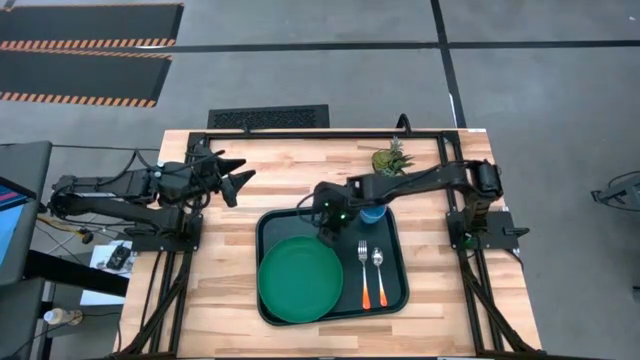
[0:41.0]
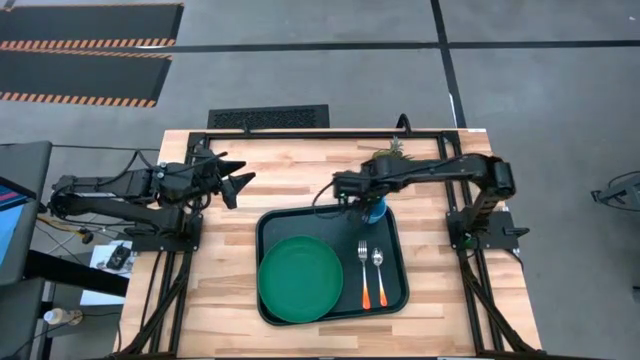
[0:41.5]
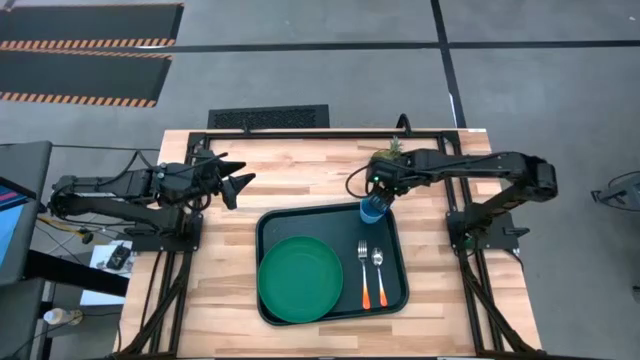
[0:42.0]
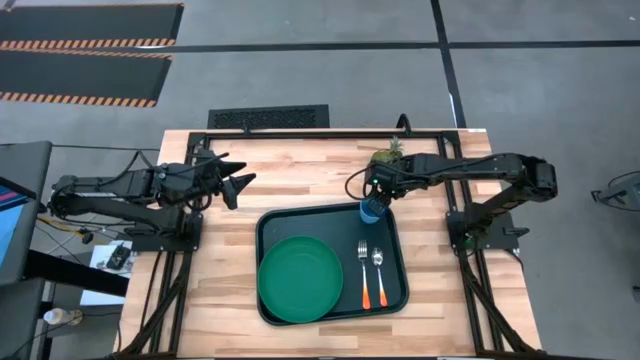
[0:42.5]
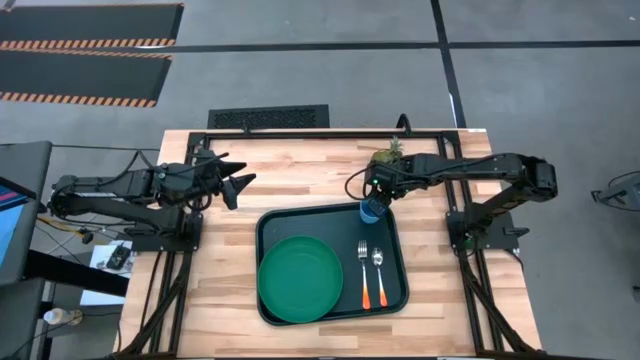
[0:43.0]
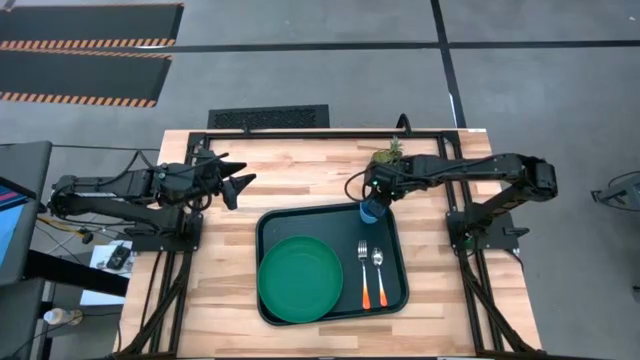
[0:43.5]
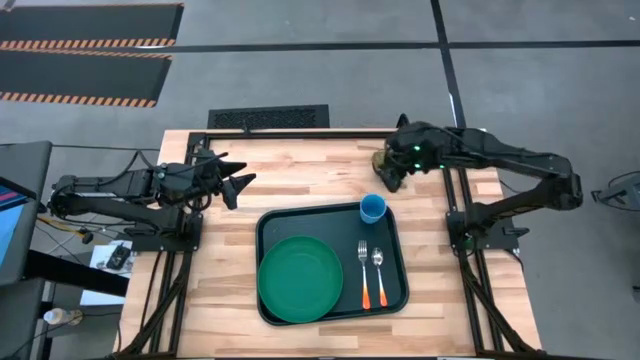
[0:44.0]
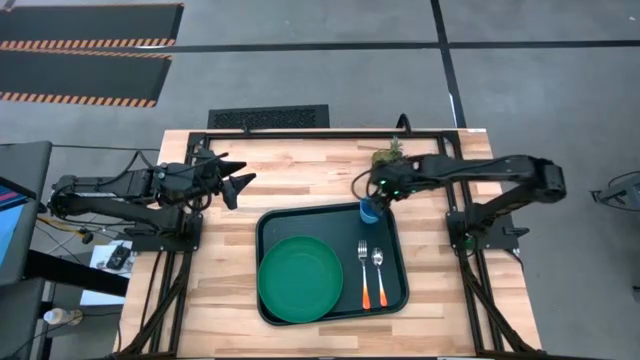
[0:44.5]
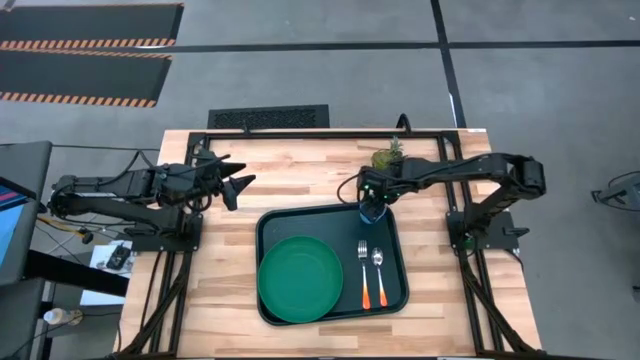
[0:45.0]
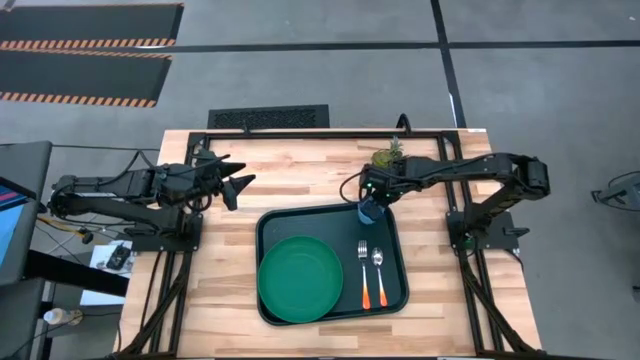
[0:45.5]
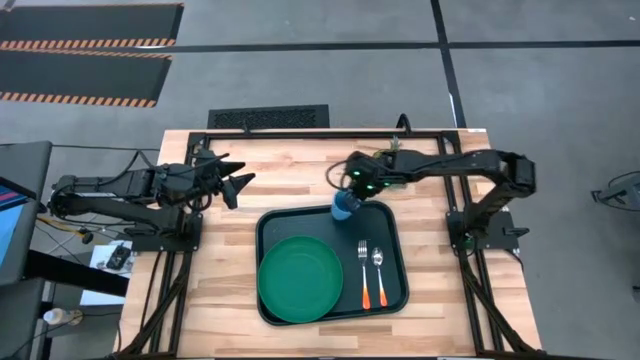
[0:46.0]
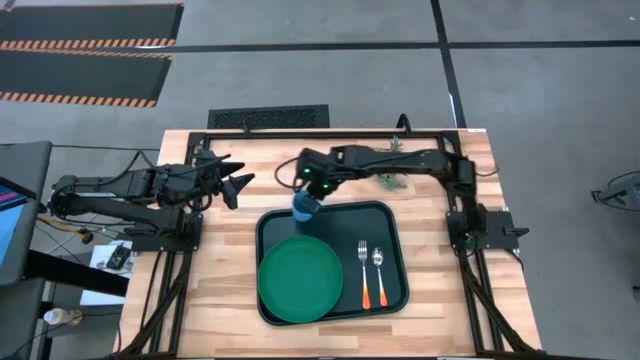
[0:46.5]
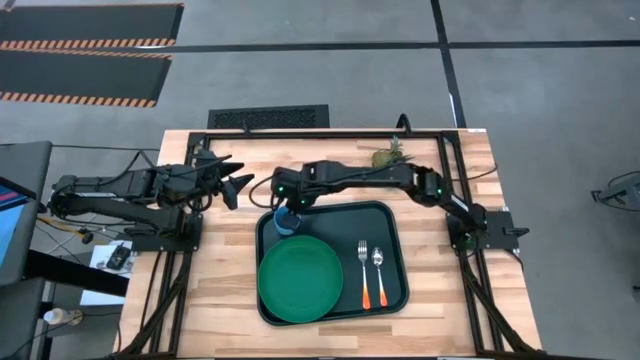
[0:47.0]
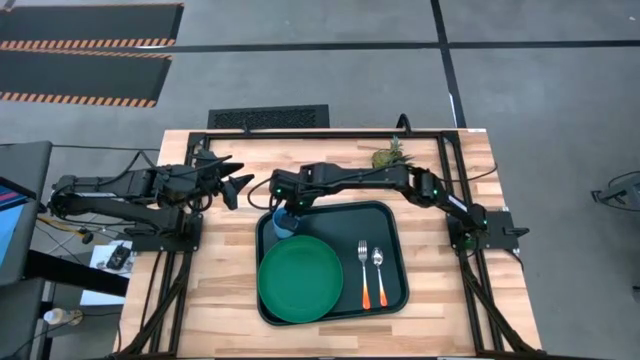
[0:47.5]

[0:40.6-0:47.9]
Task: Pick and place plate/cup/fork/spoon on tray
Move the blue cup from the top of the orange fork to the top of the green plate on the black table tray

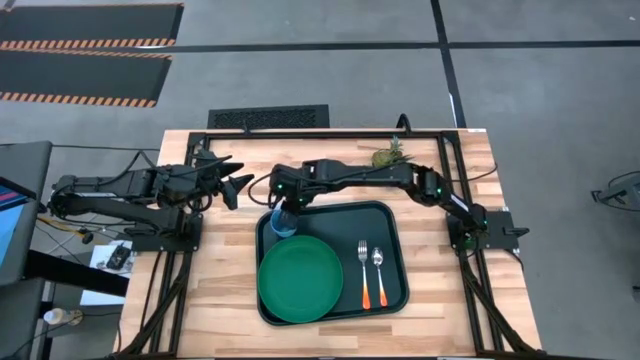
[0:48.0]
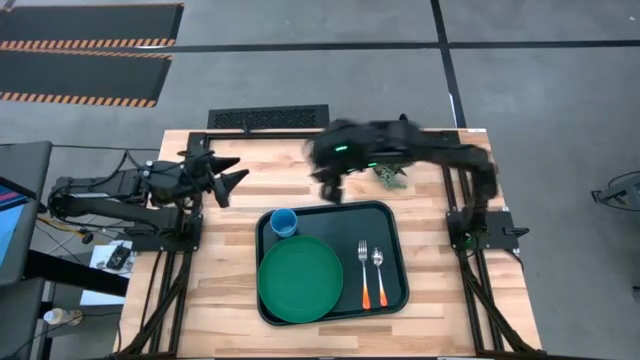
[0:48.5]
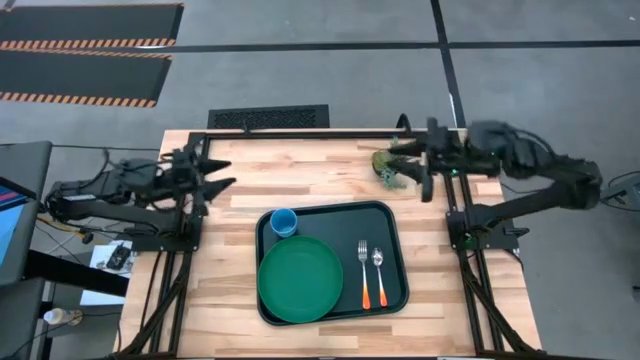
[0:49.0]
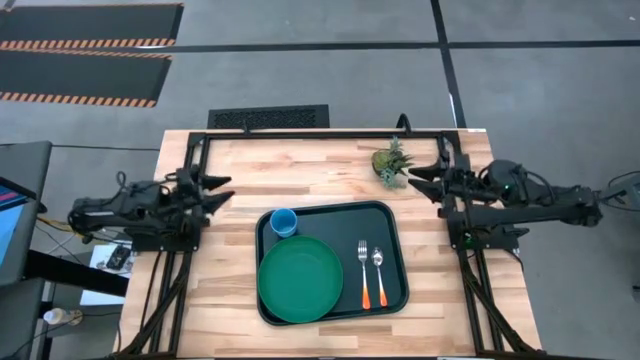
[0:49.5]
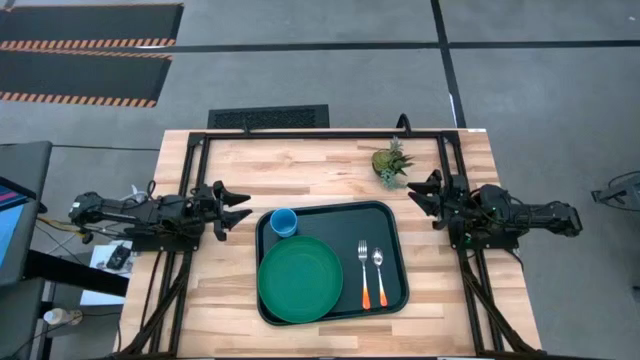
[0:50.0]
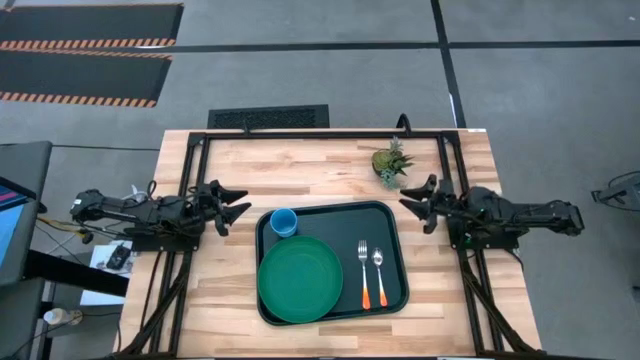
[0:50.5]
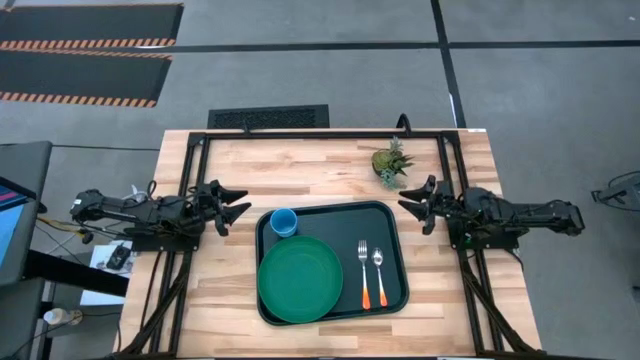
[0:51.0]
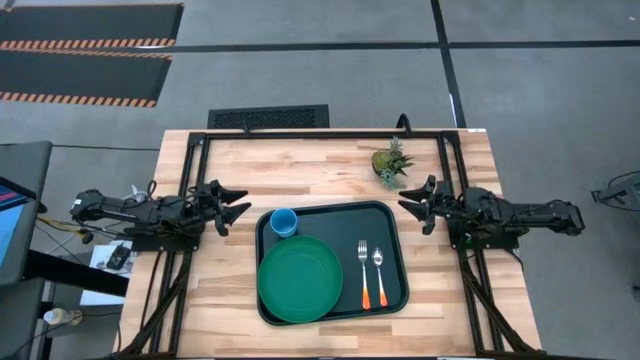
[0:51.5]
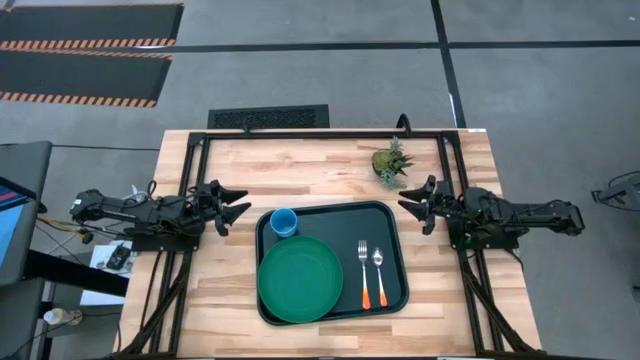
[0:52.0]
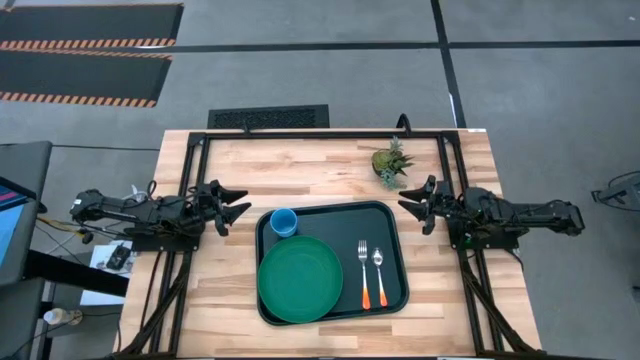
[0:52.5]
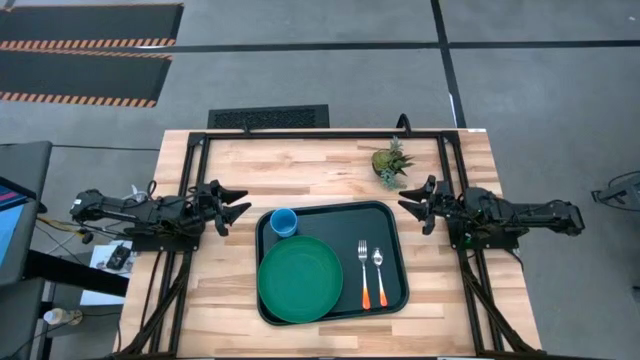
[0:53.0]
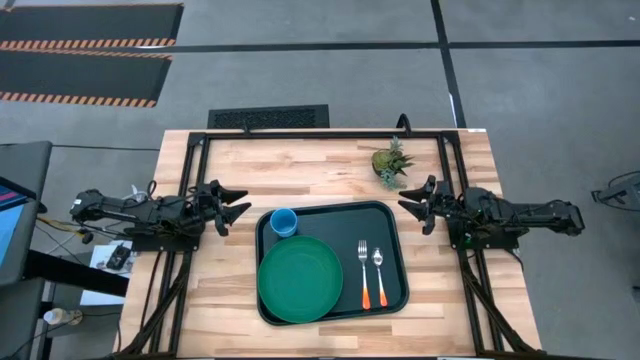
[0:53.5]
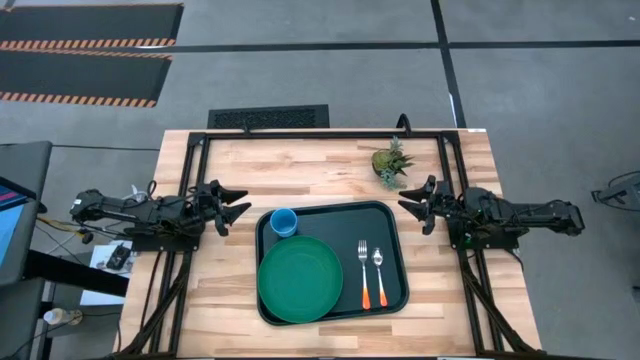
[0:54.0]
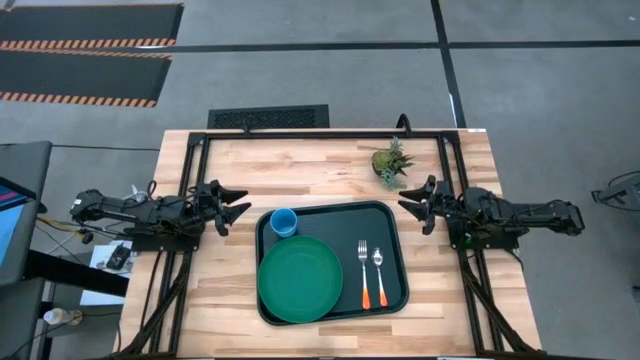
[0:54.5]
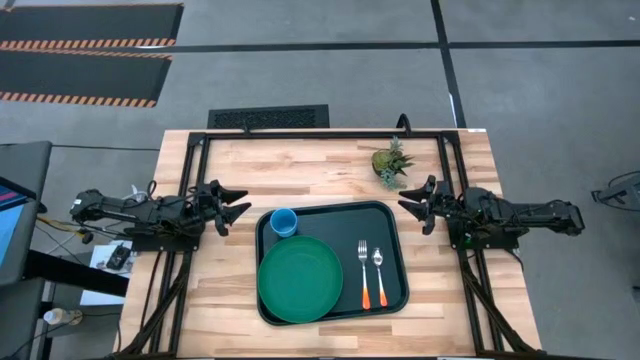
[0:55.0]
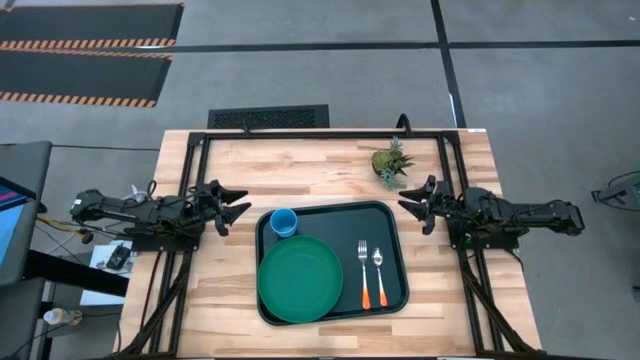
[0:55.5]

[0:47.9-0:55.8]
Return to Home Position

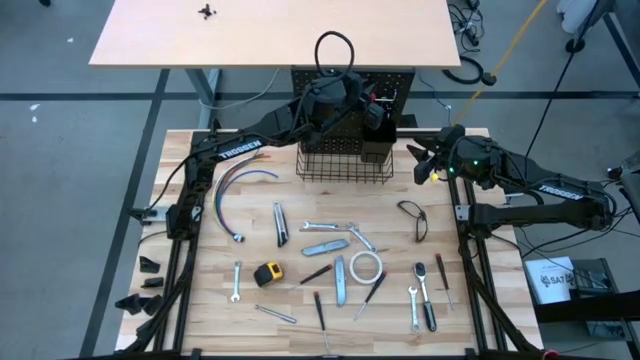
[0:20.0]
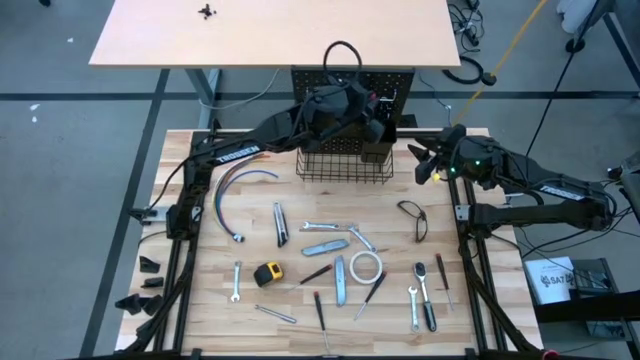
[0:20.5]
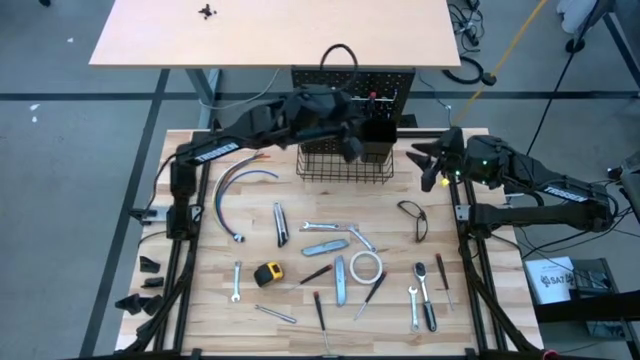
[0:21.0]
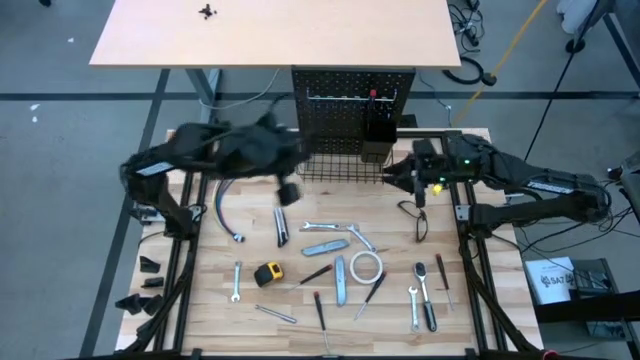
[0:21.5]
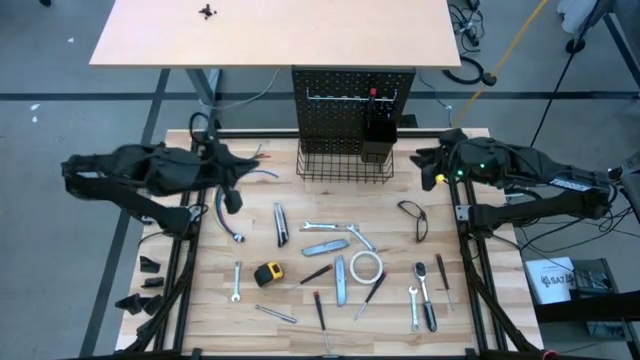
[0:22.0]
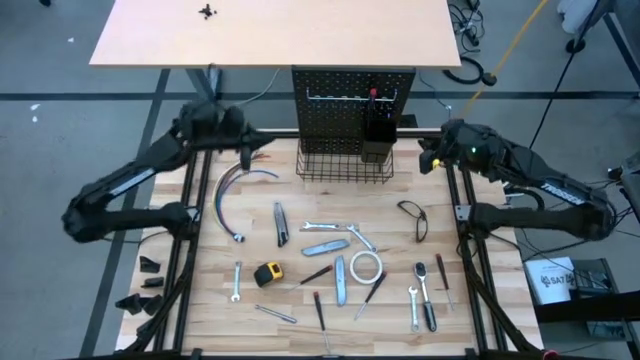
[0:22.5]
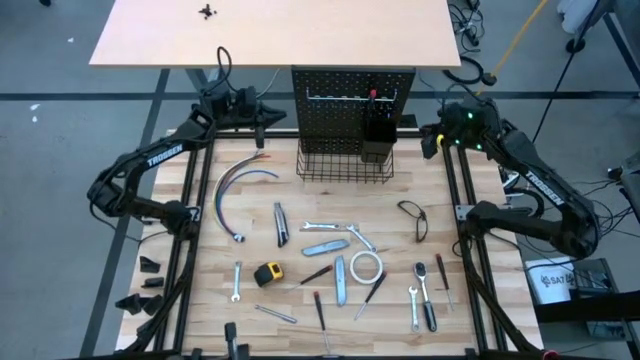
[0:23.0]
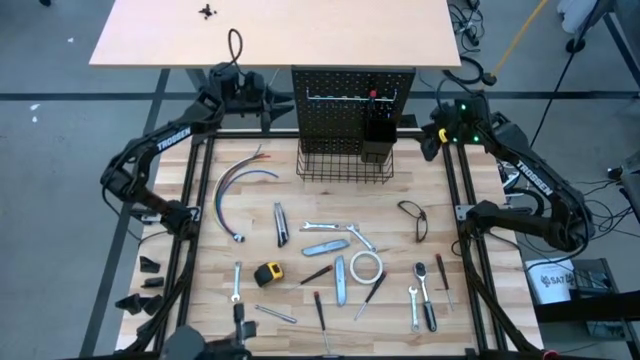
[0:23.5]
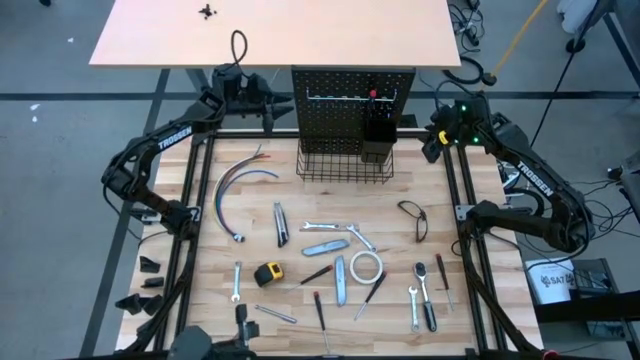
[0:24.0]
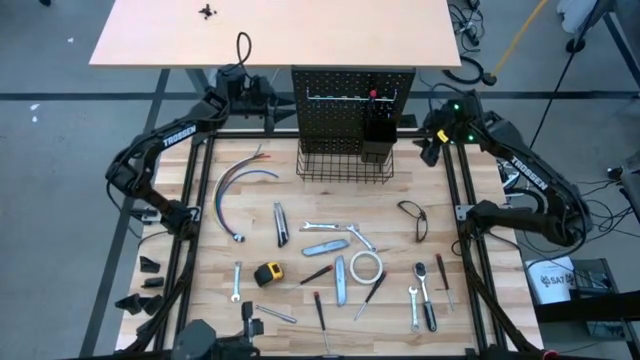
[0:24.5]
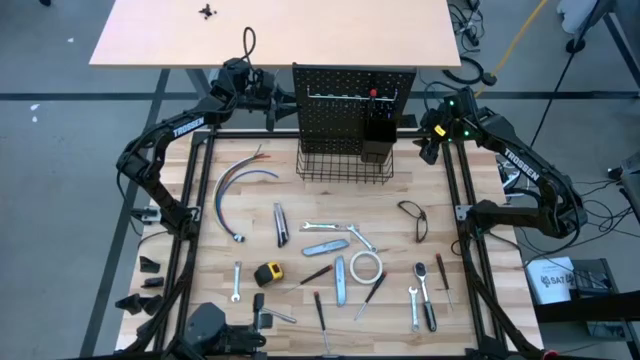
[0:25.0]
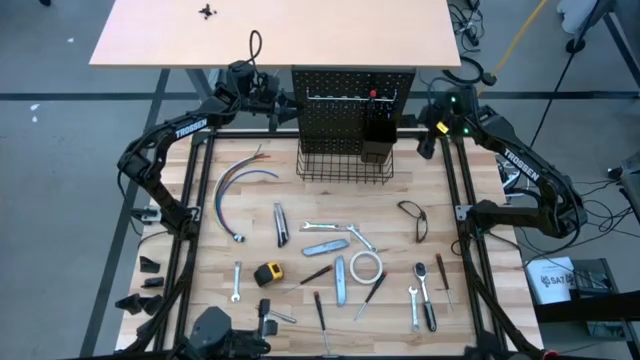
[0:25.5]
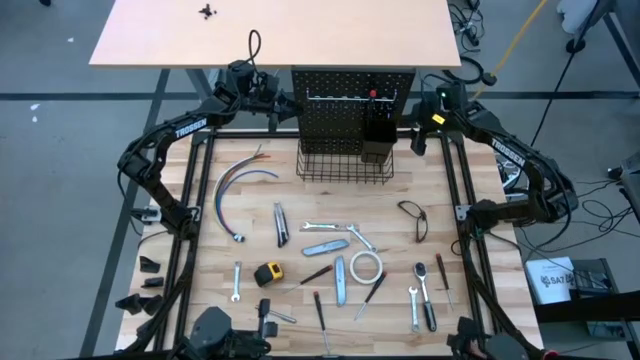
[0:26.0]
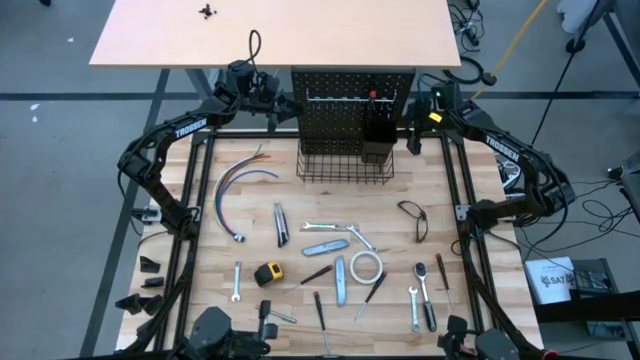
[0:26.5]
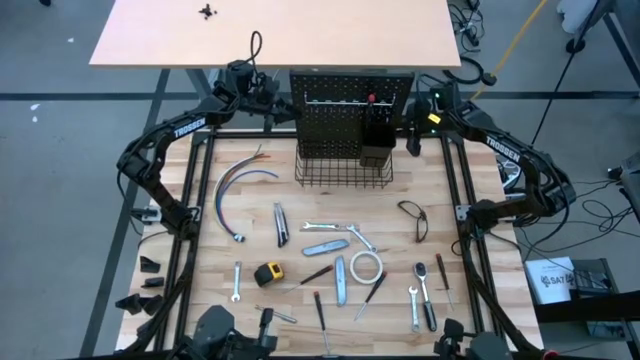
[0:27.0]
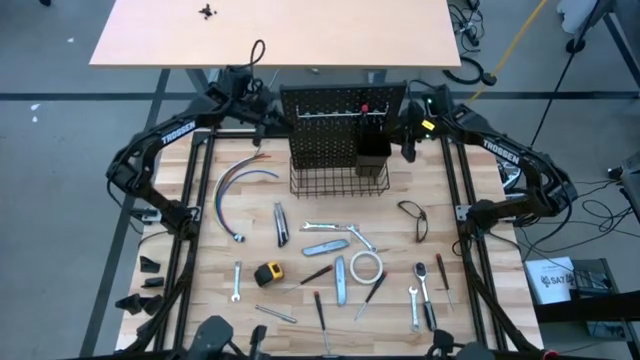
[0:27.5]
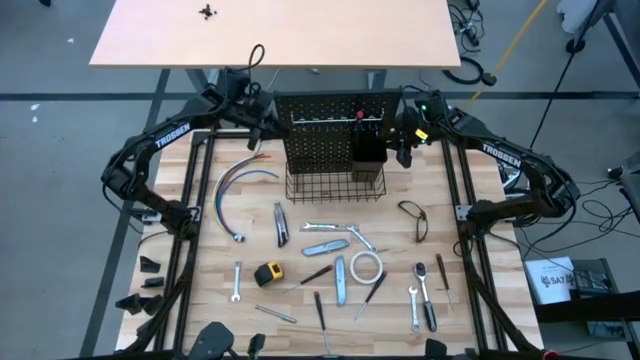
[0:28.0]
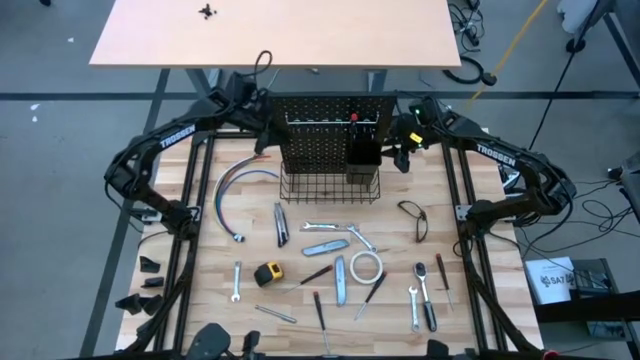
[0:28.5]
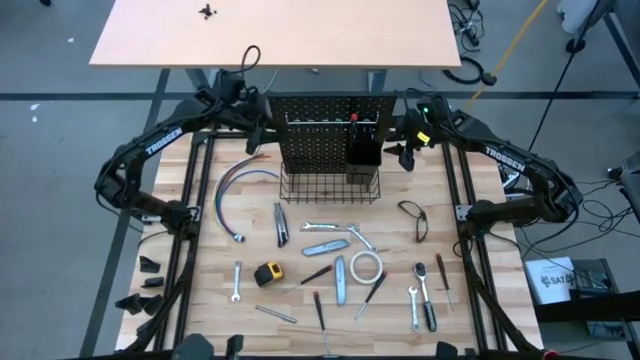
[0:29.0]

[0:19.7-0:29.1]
Task: Hang tools onto peg board
Adjust the pegboard on the table
